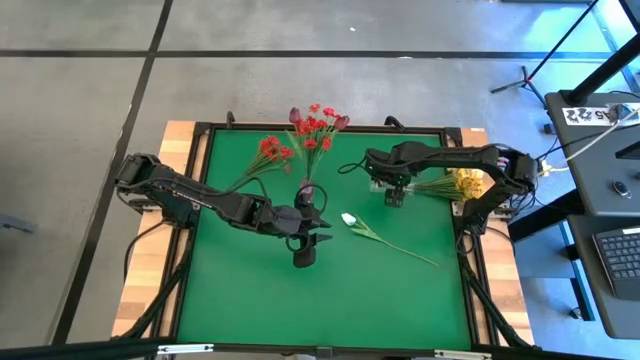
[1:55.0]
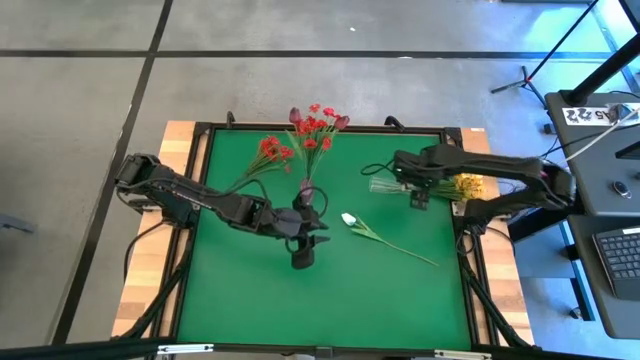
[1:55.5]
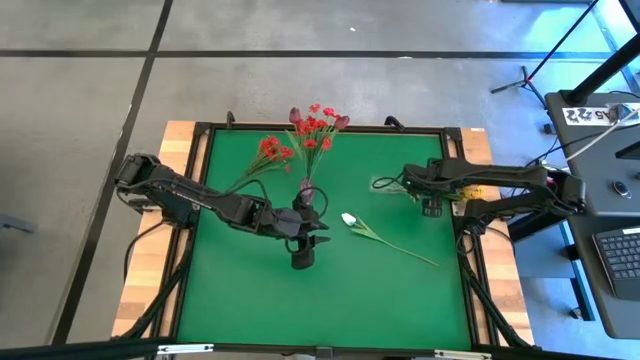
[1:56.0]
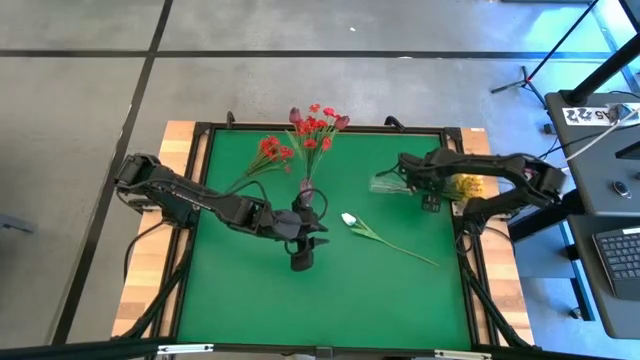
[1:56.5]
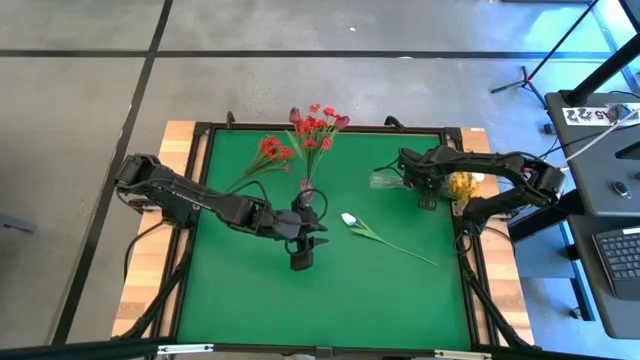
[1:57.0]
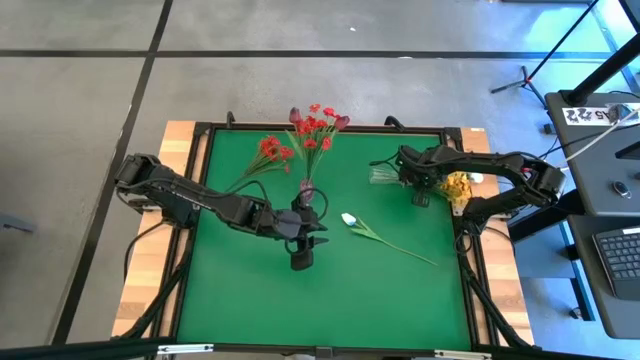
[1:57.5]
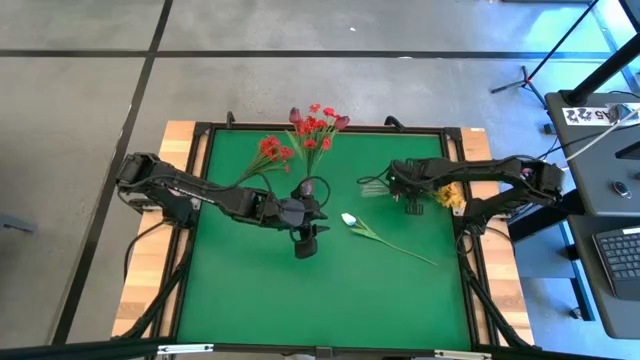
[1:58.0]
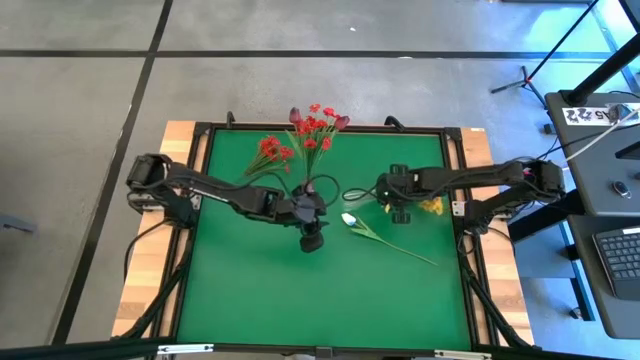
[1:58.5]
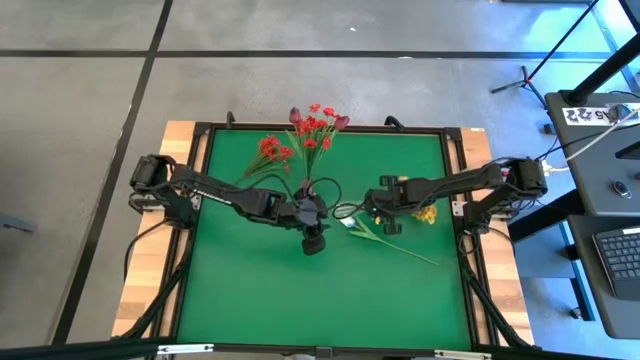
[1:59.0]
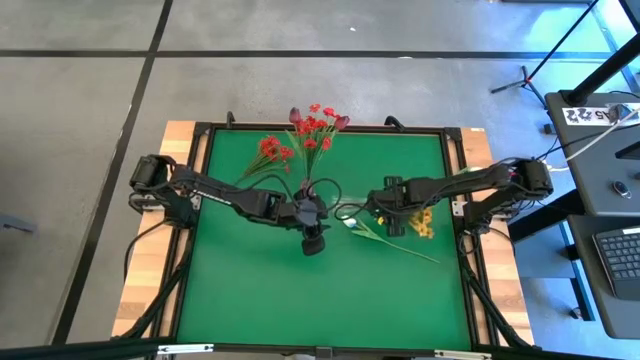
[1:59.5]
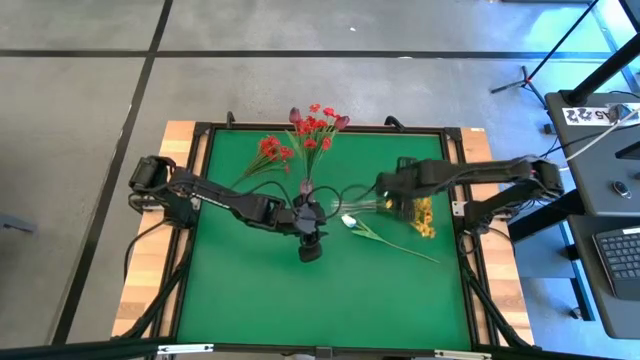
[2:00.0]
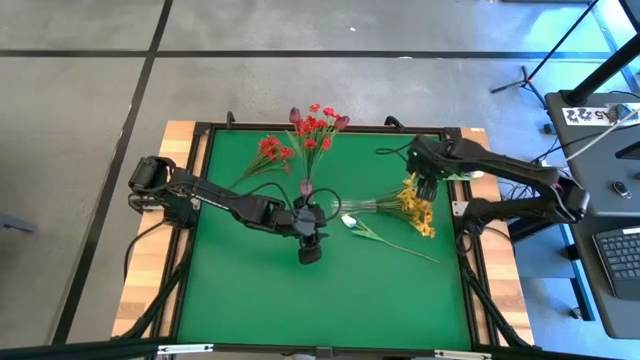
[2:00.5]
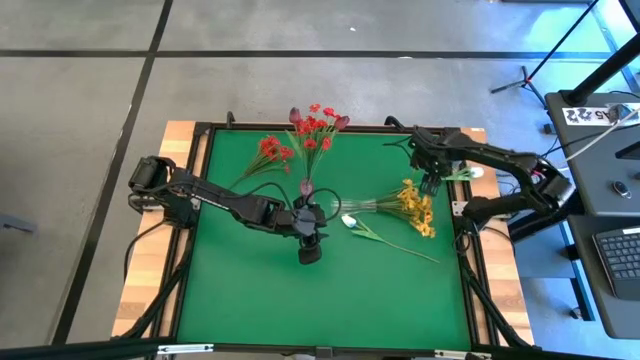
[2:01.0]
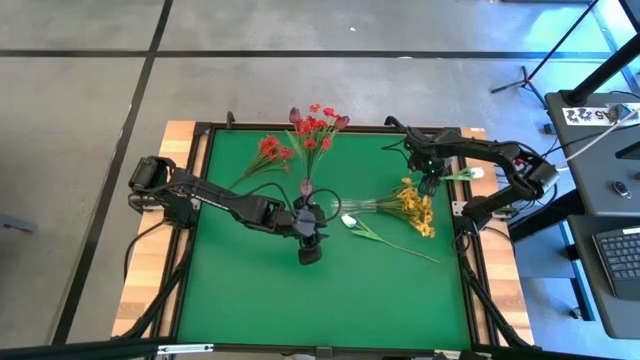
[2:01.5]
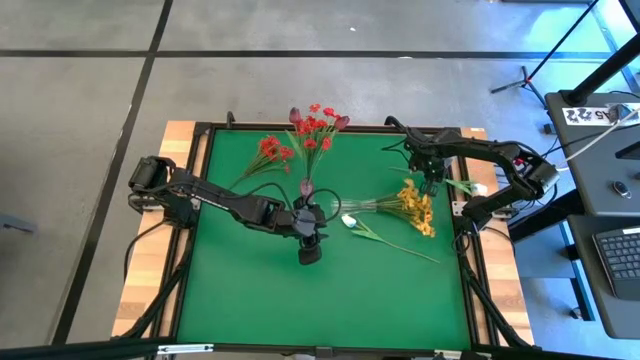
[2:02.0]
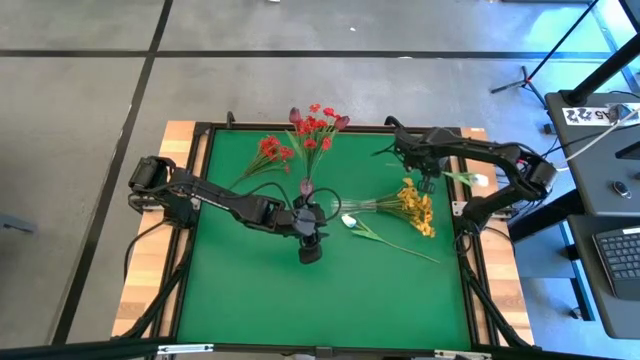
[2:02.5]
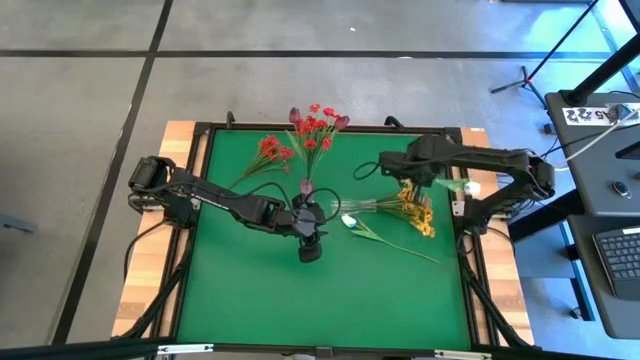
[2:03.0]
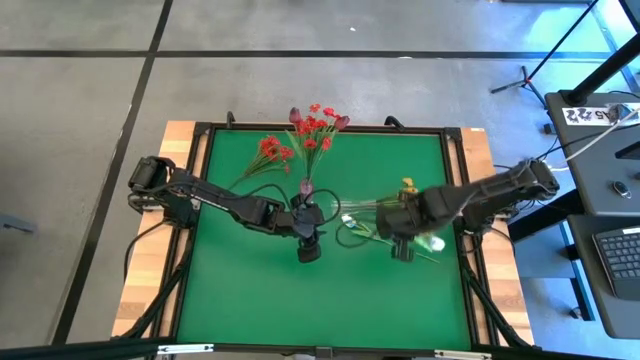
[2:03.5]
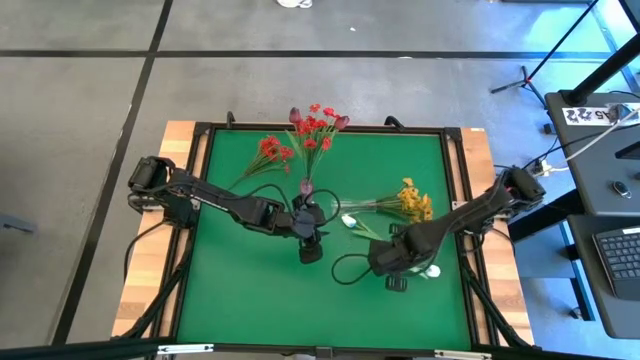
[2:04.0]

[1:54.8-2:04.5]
Task: Sort flowers into vase by color
Remove the white tulip from the transparent vase

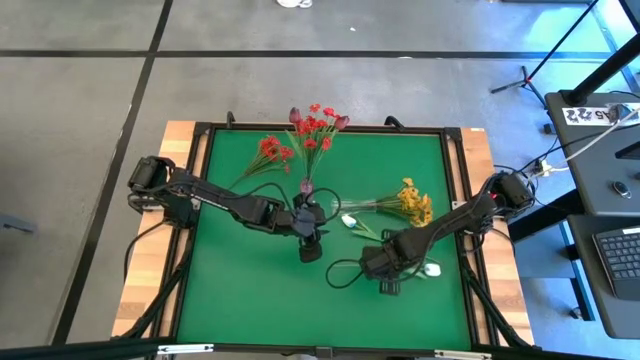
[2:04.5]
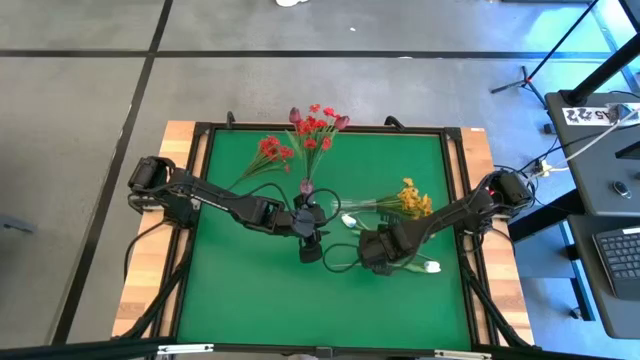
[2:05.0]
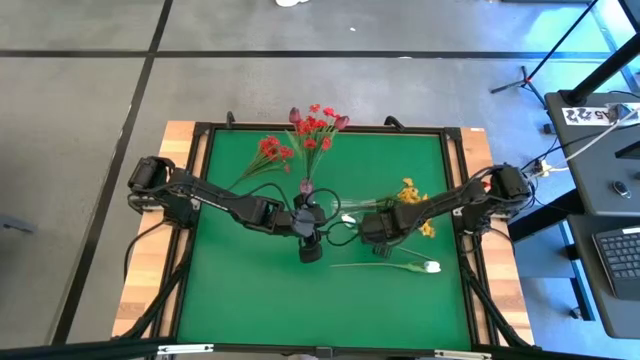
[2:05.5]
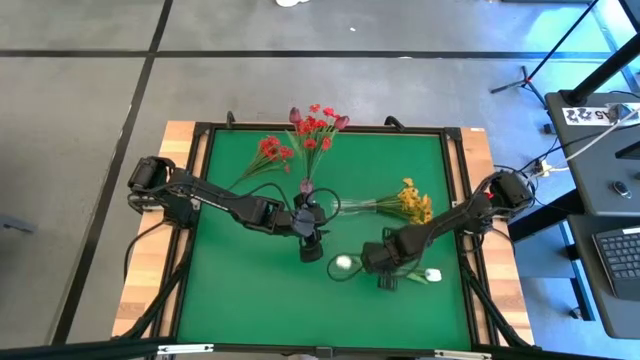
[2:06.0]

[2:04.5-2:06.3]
Adjust the white tulips

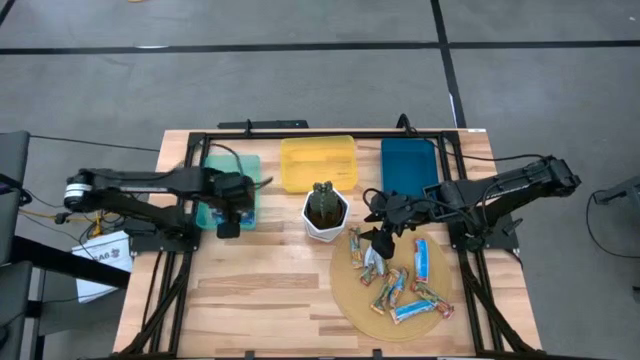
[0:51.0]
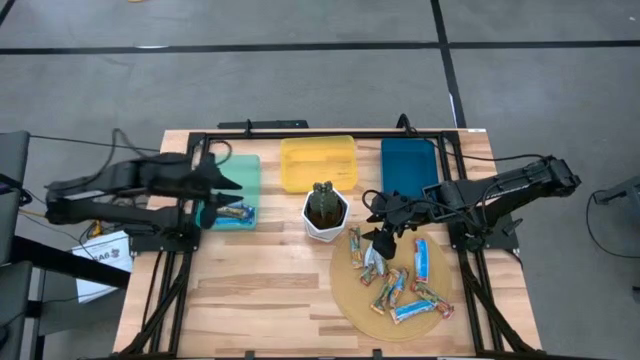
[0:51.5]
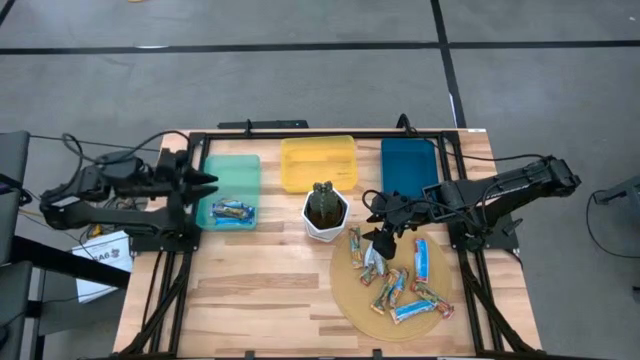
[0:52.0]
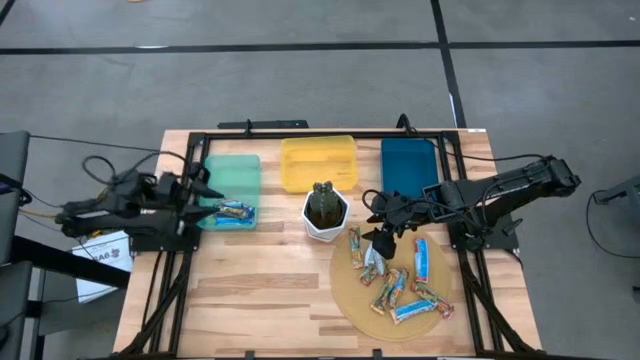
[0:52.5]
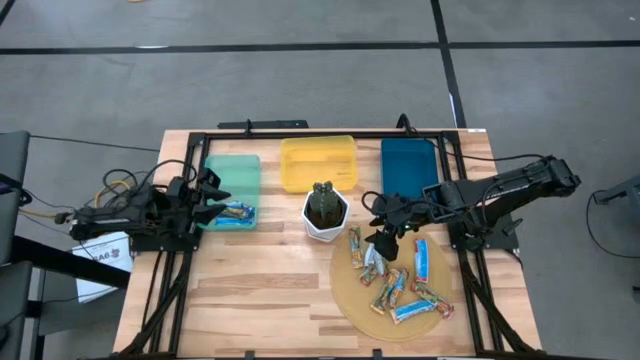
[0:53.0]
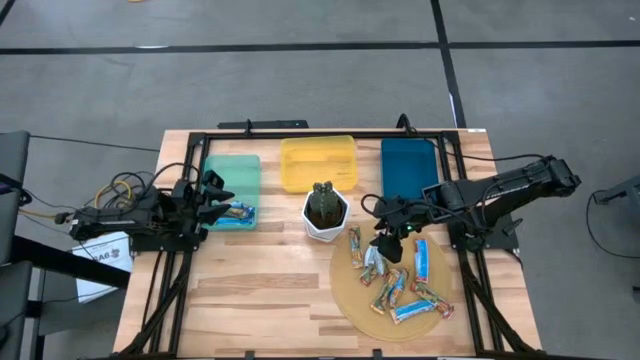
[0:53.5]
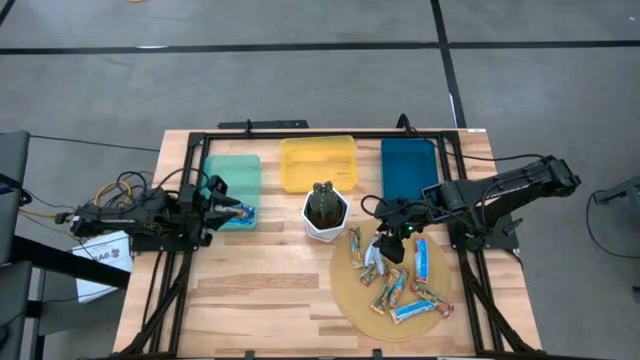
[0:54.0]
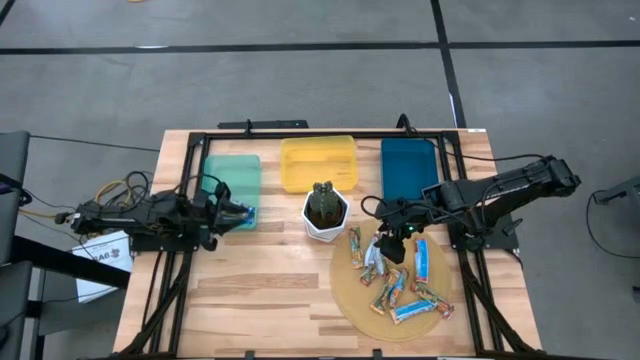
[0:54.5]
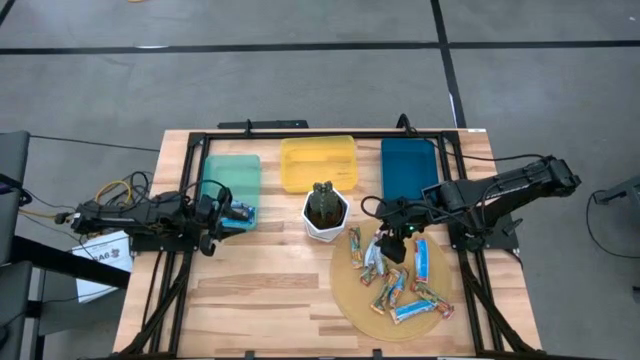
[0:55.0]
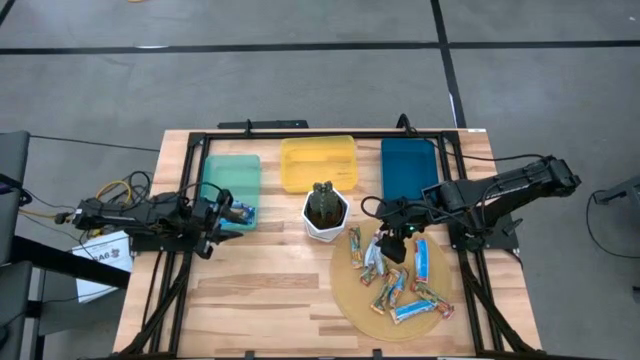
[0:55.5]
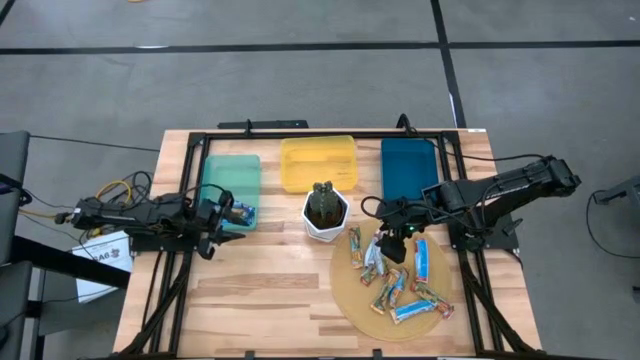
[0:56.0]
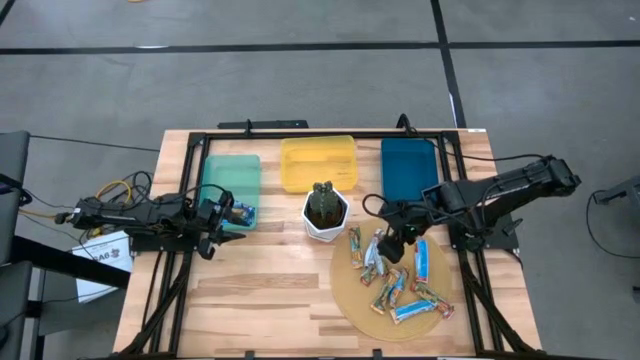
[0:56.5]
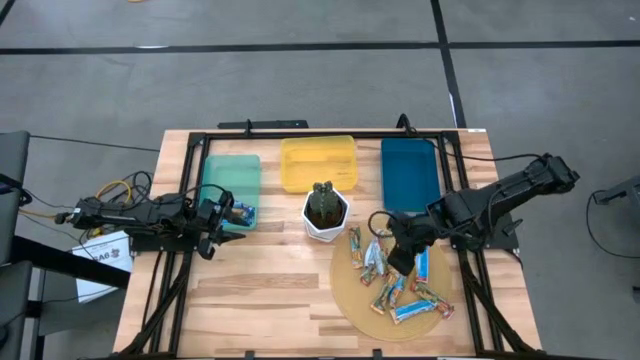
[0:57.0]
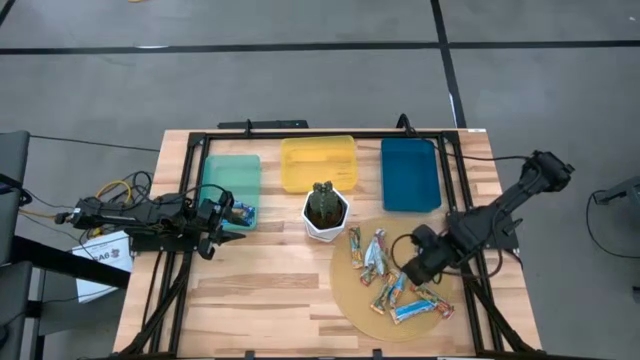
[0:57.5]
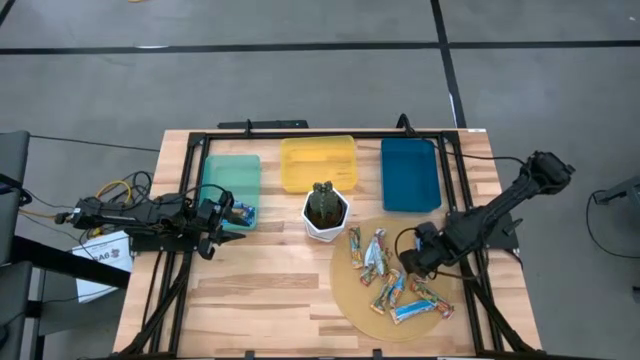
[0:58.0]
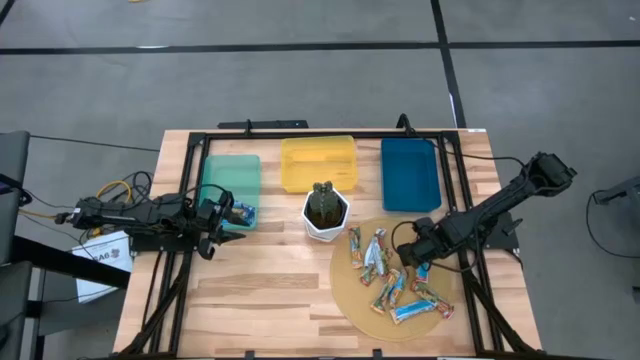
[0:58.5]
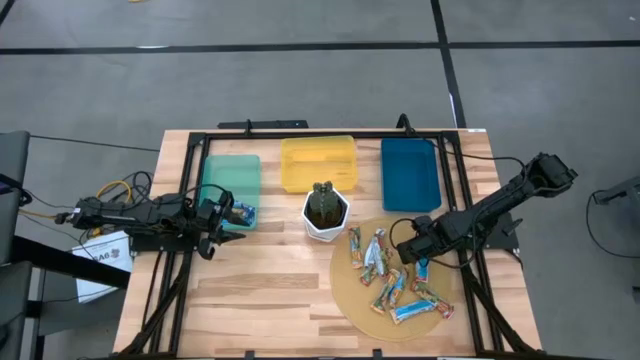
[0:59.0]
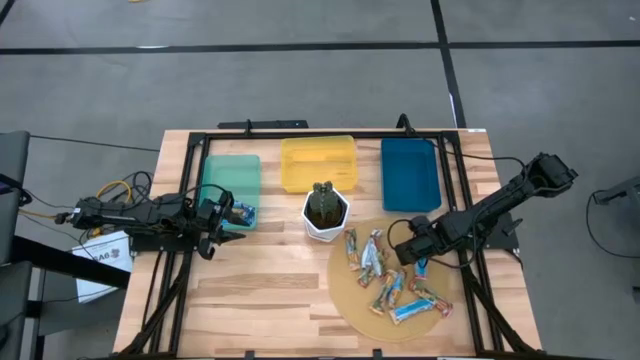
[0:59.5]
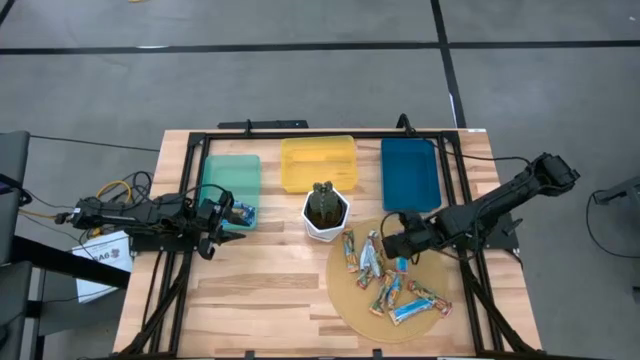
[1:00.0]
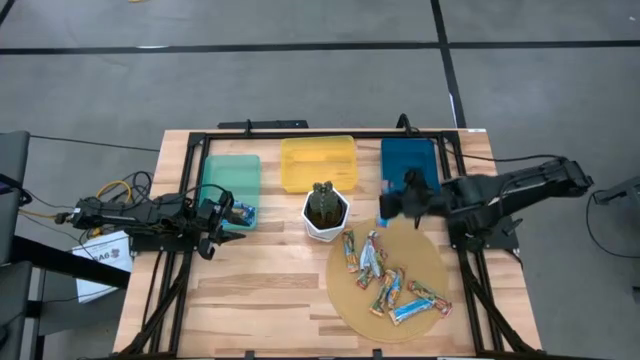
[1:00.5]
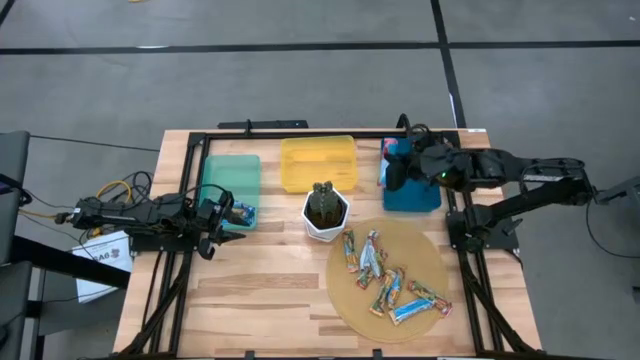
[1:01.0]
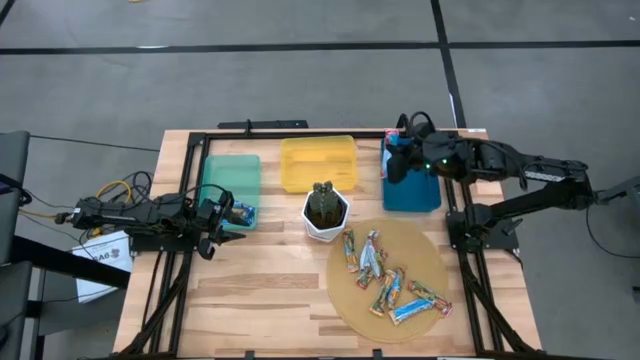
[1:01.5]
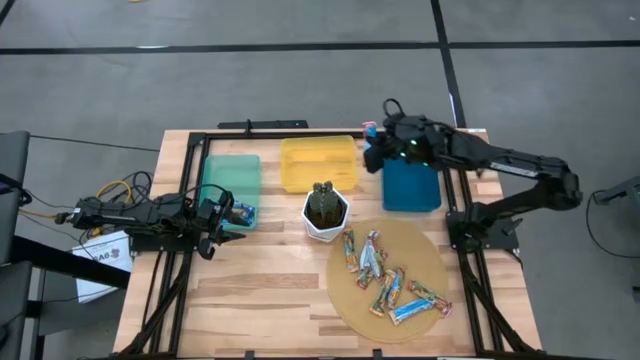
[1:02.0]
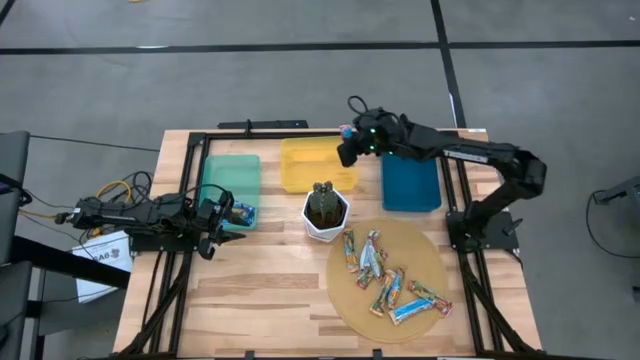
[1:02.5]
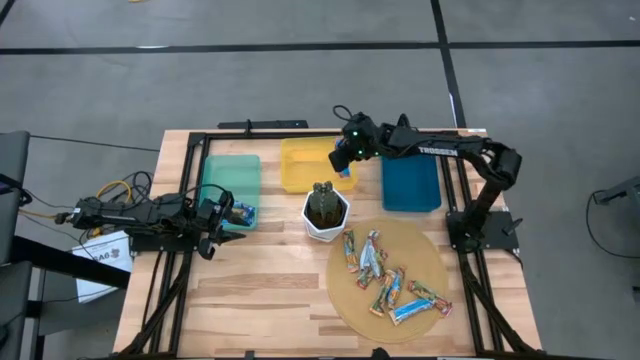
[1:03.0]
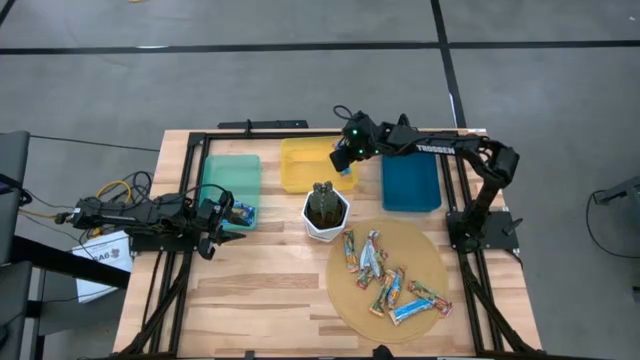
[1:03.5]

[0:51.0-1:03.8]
Task: Pick and place Granola Bars by type
Put the red granola bar into the yellow bin
